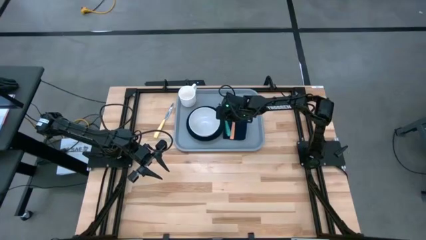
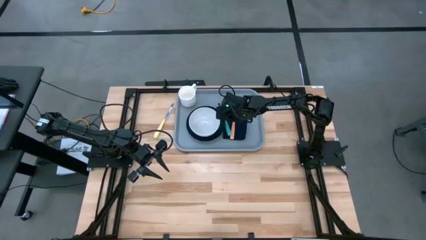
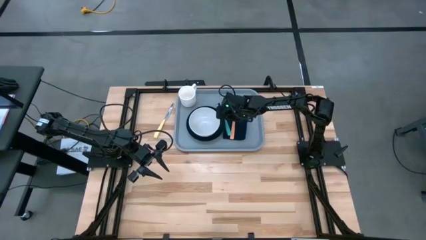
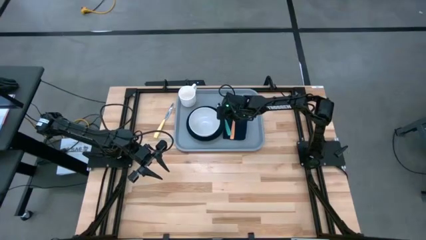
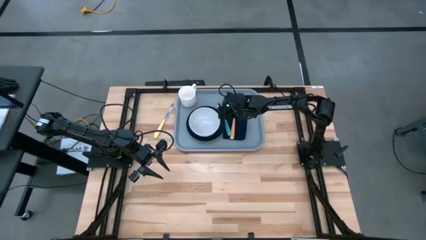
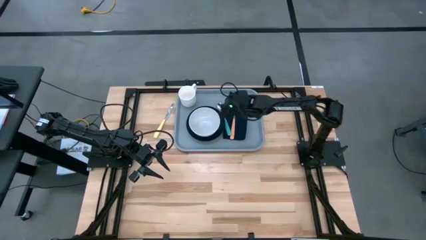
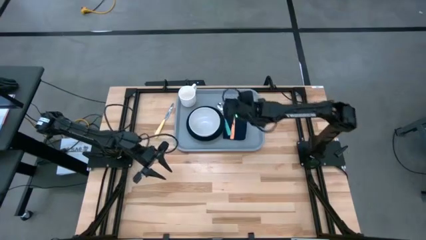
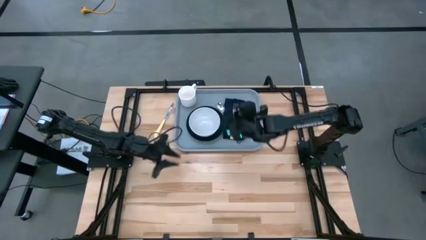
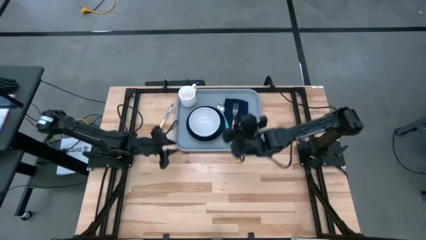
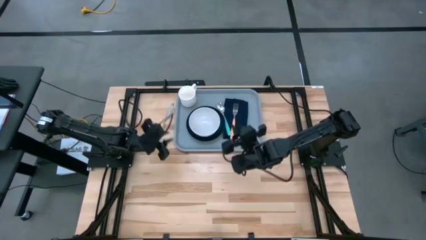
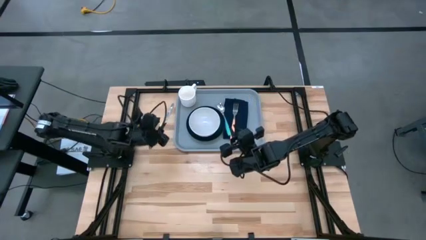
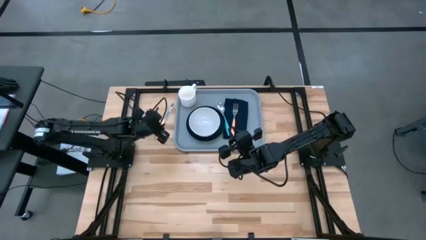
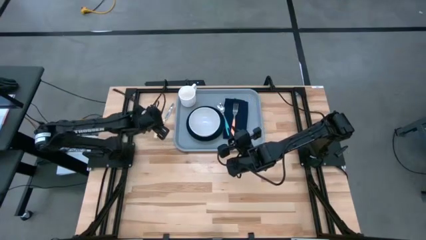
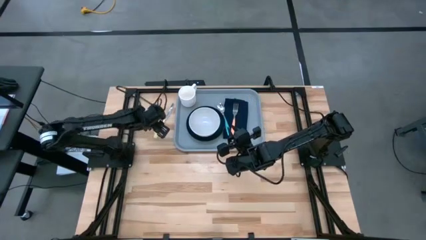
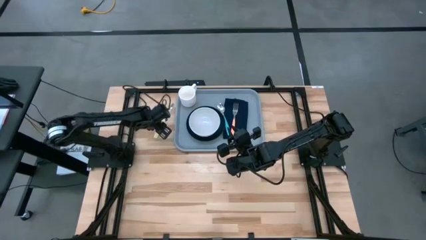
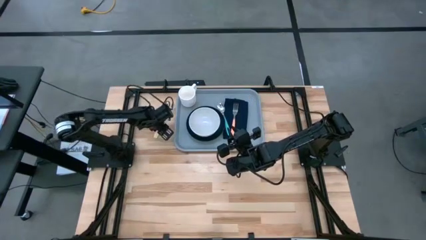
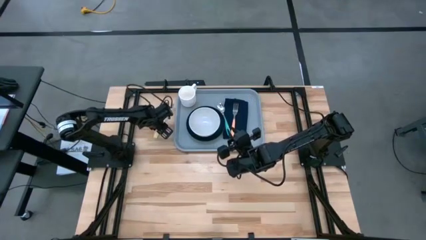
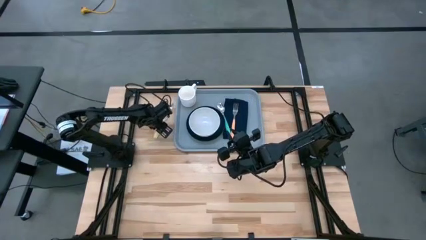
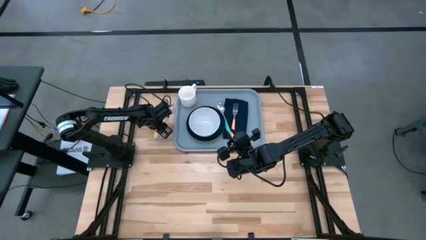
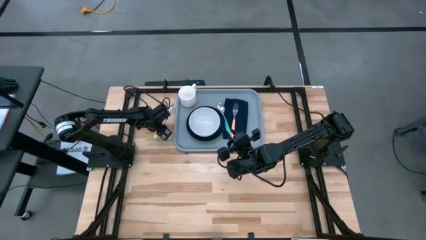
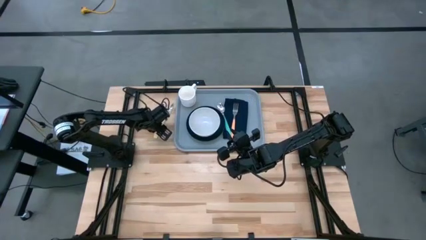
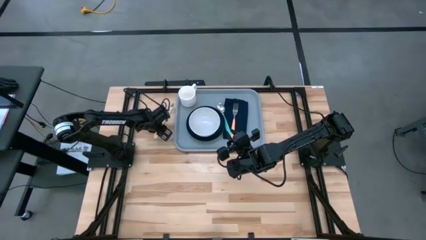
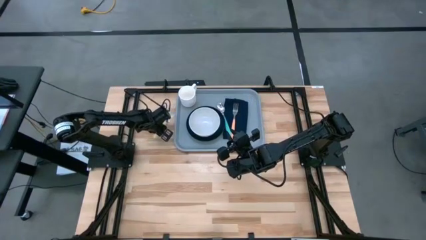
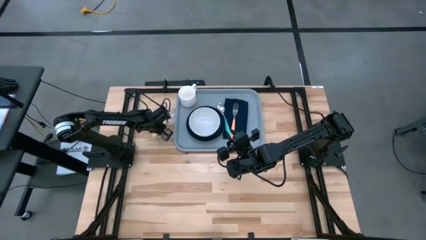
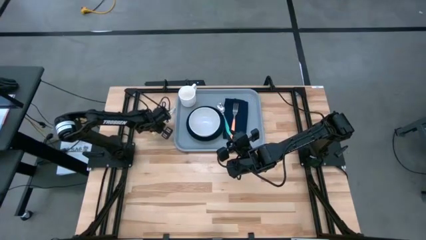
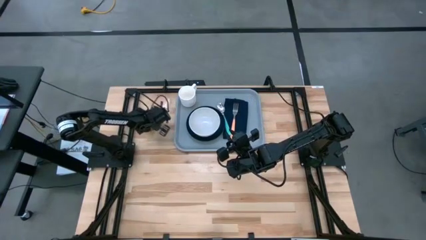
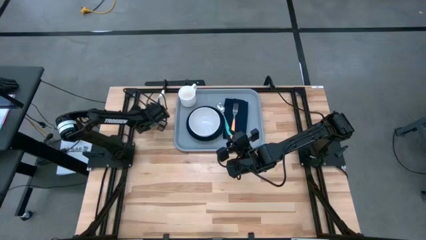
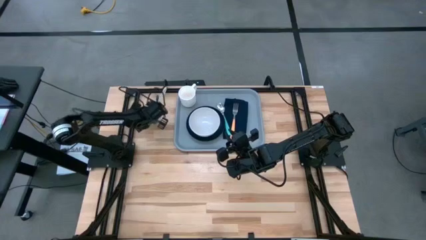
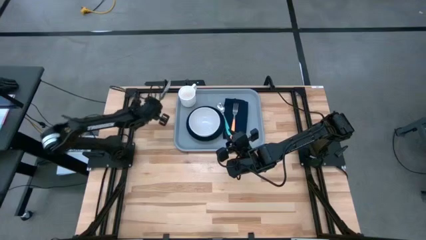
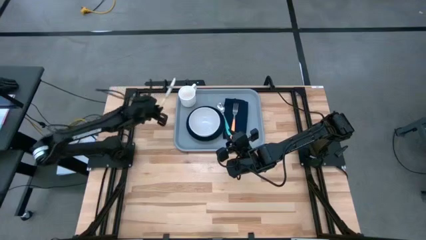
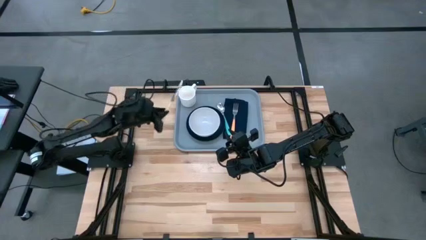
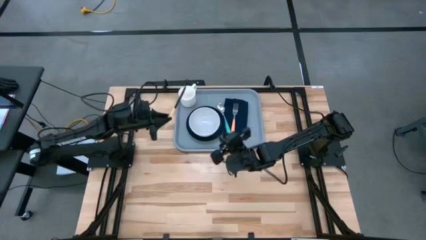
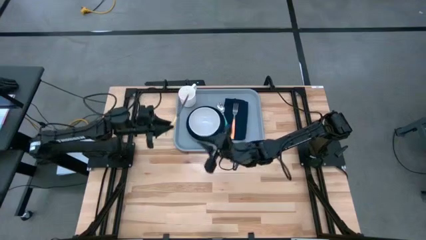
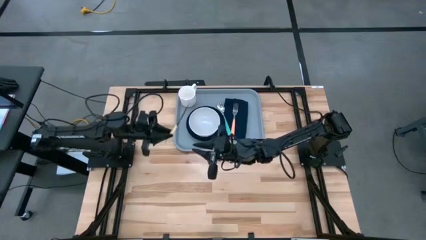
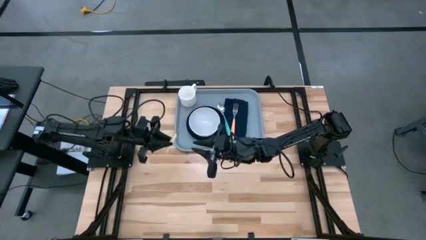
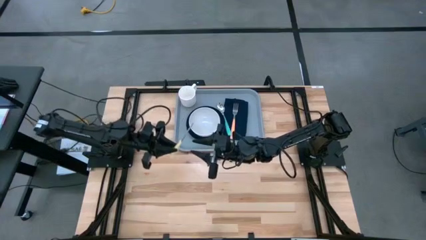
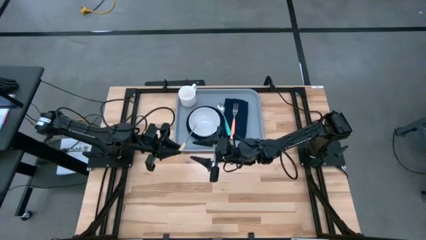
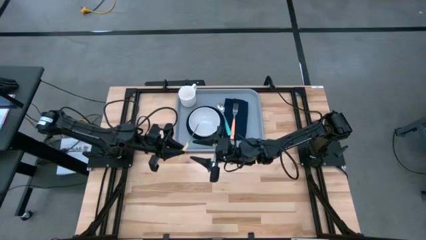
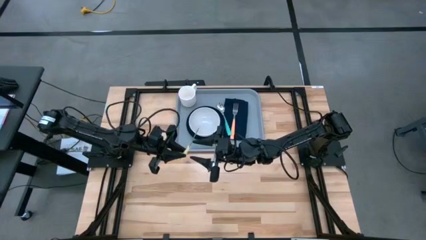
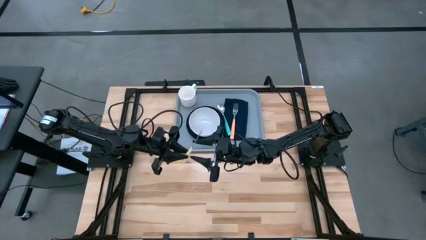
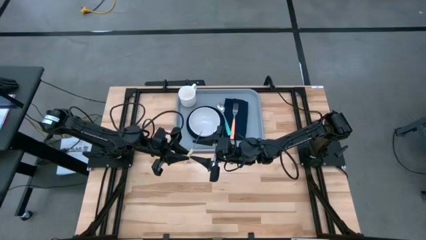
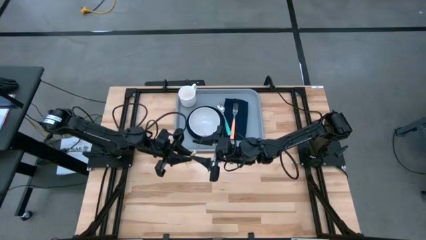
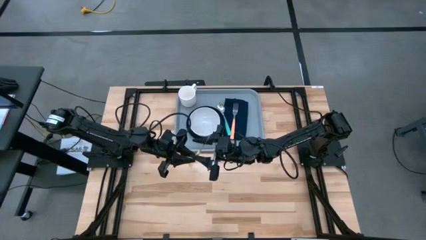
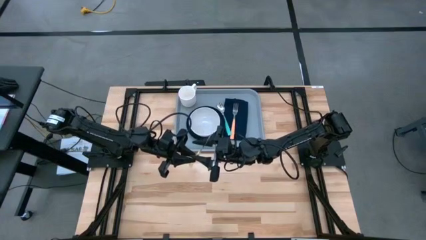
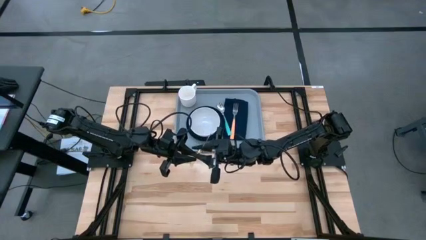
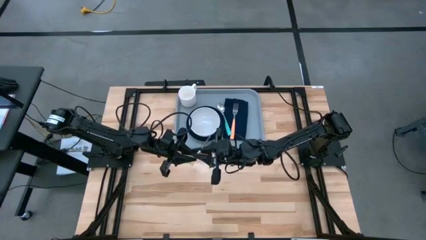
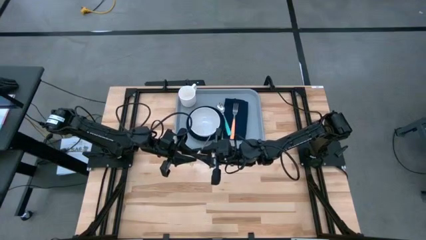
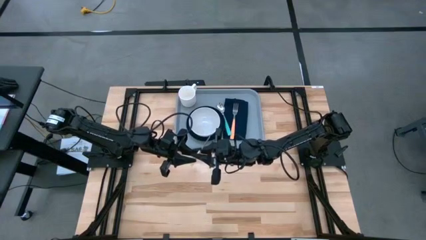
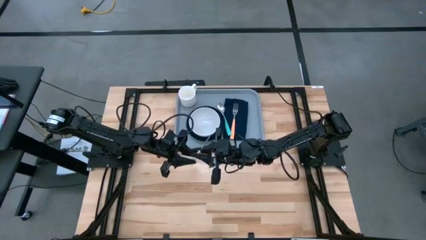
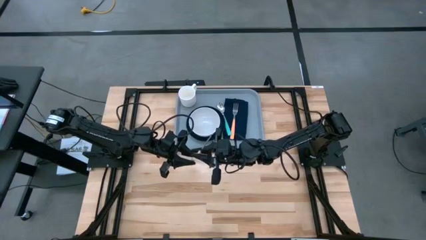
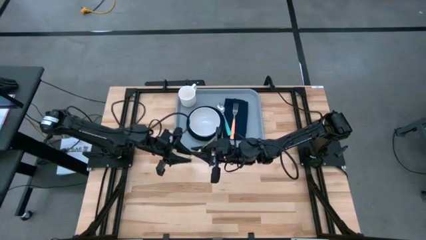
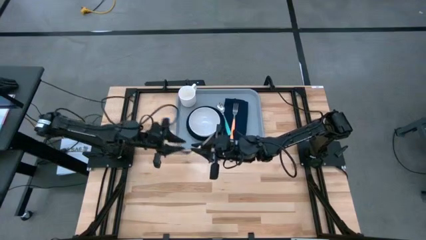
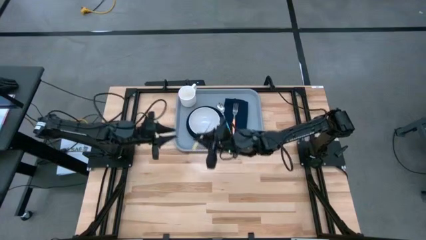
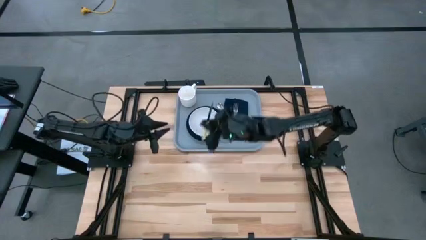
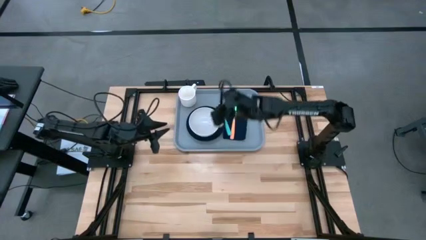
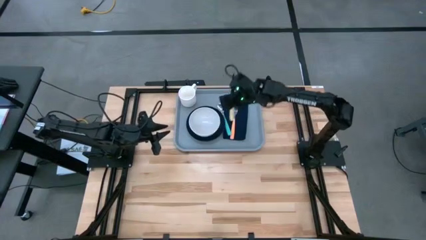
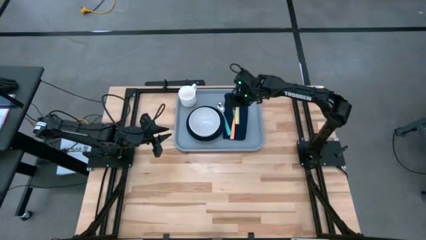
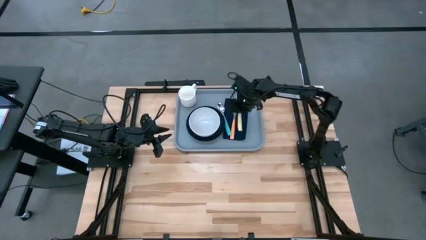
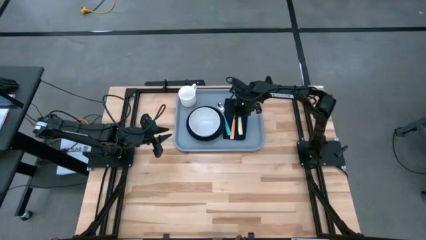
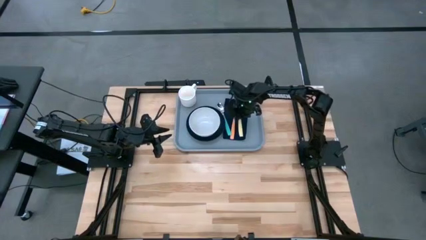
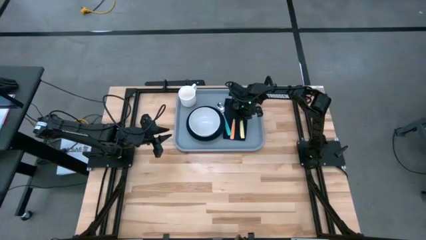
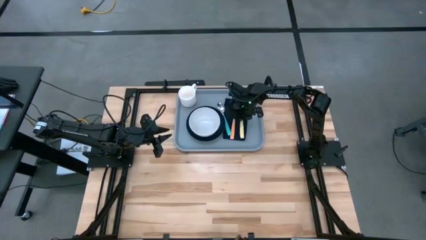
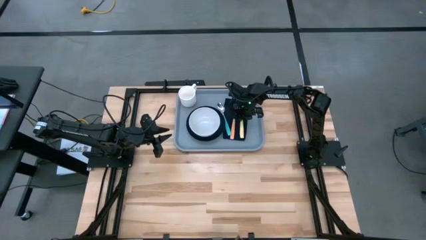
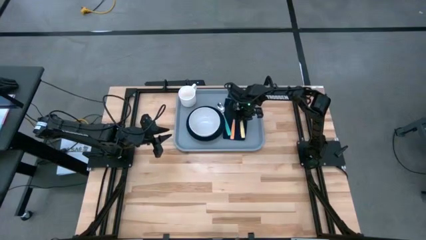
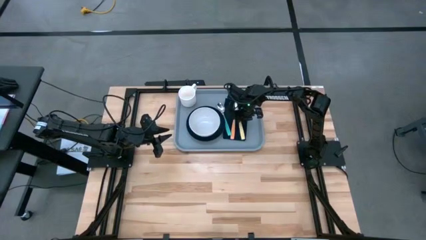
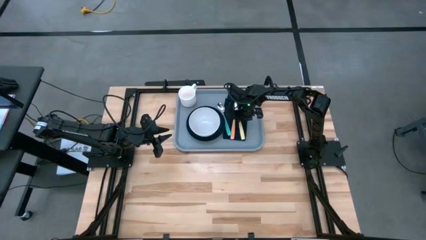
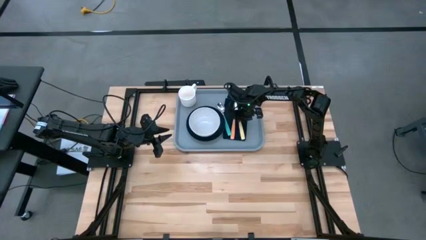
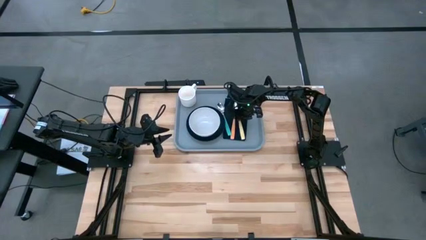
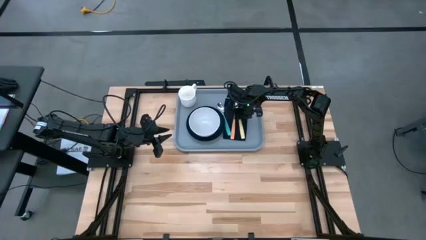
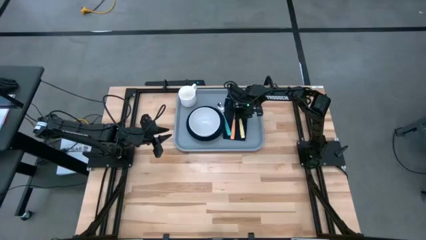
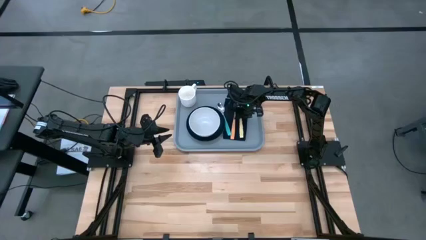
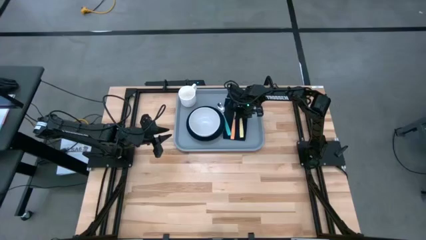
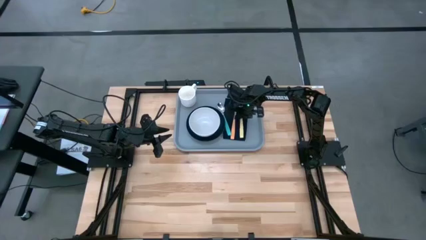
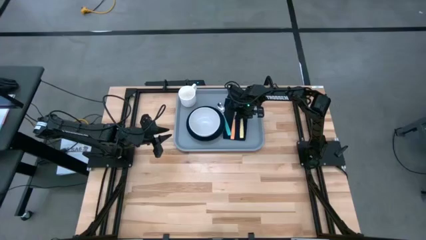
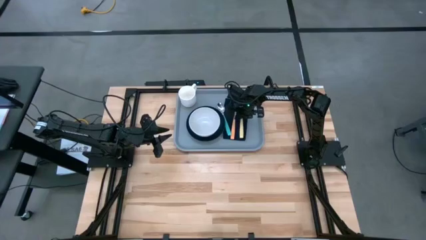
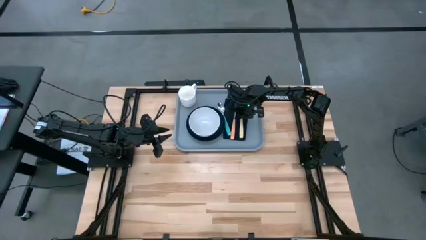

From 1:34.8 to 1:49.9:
Task: Set up tray
Put the yellow knife to the right of the orange fork on the blue napkin on the gray tray

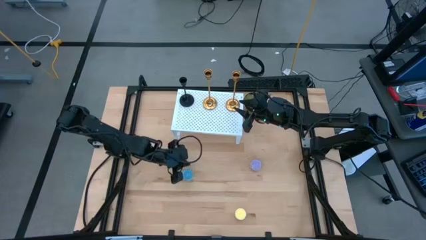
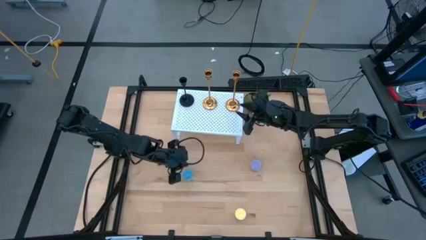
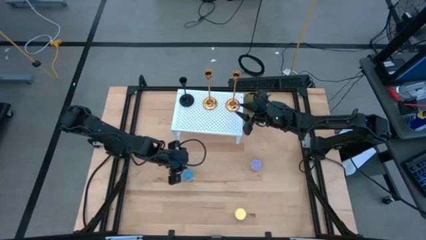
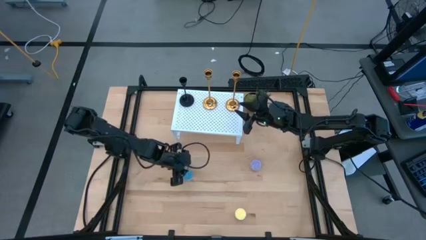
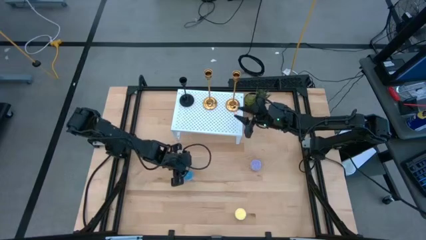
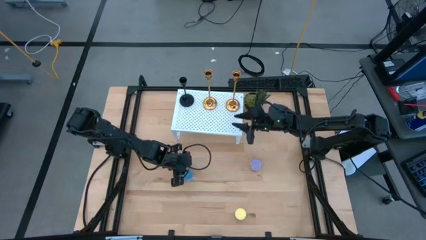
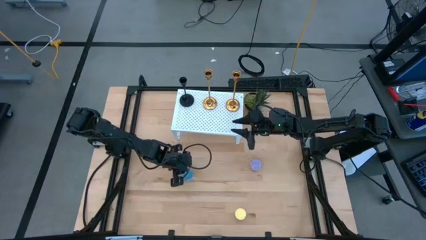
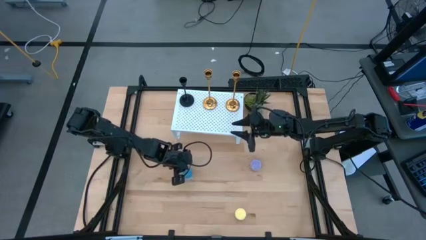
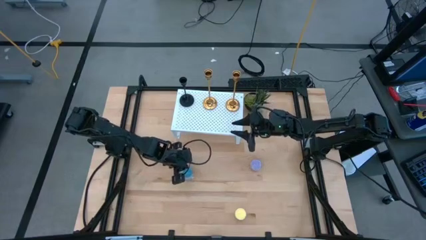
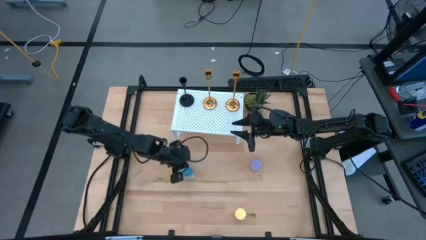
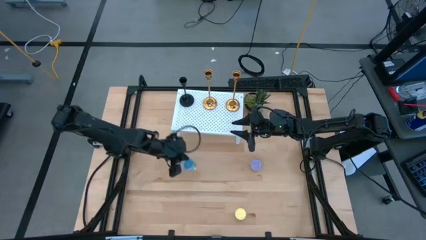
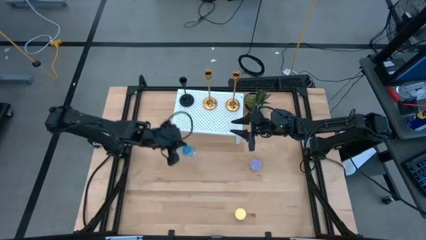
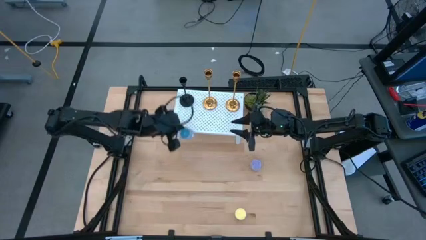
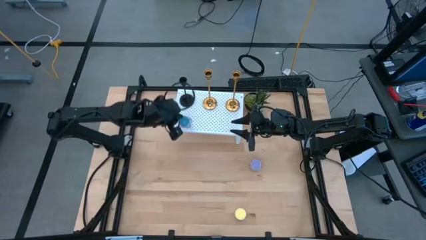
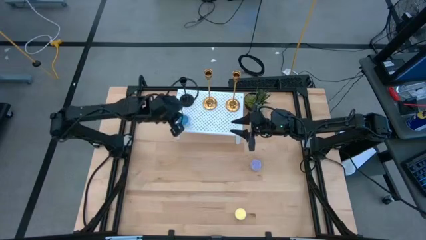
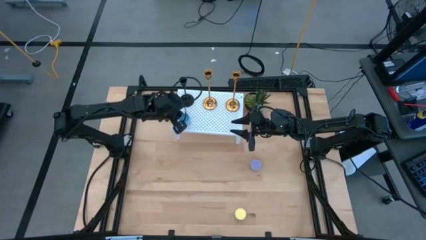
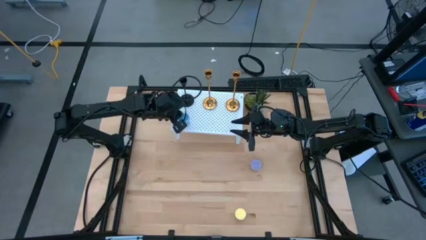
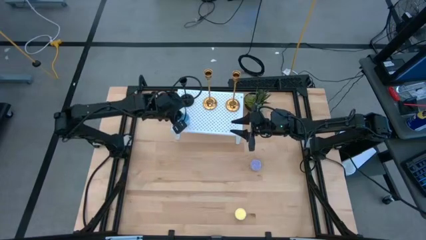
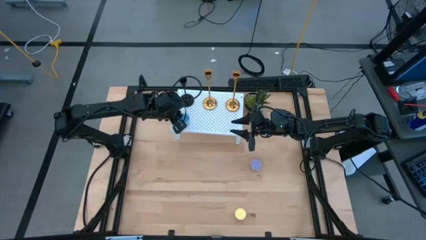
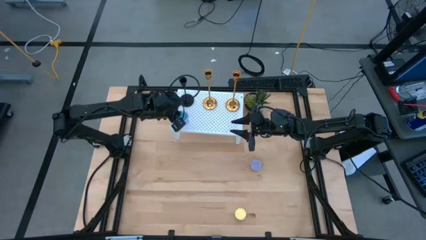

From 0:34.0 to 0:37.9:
Task: Pick & Place candle stick holders
Put the blue candle on the shelf
